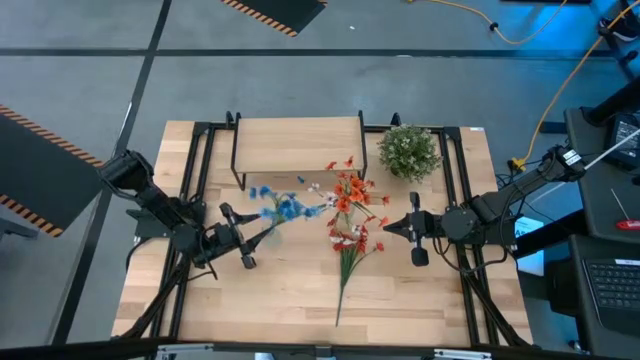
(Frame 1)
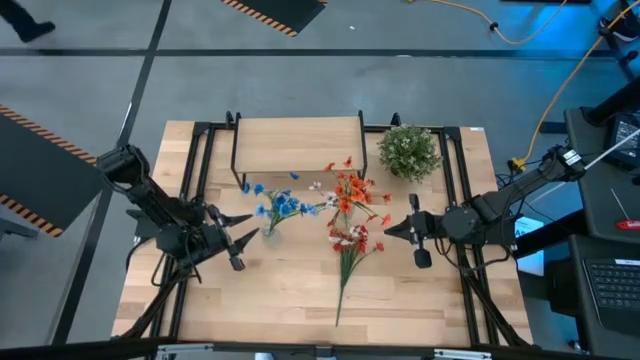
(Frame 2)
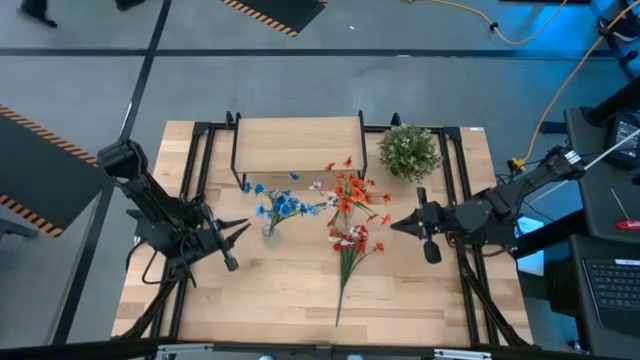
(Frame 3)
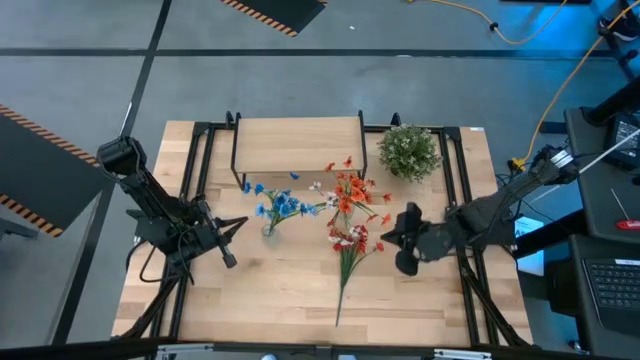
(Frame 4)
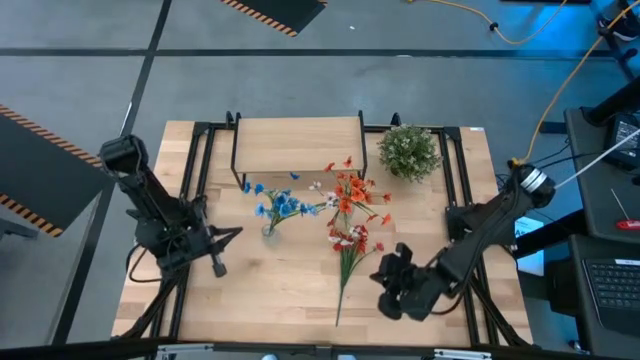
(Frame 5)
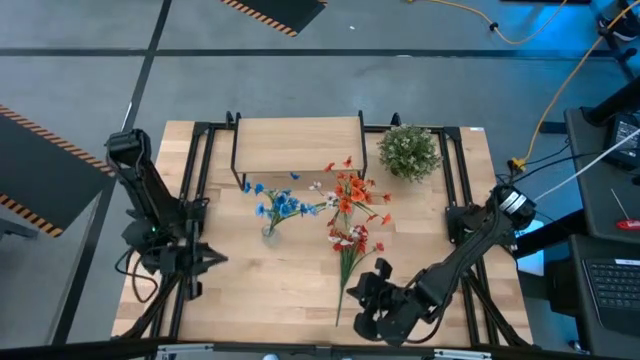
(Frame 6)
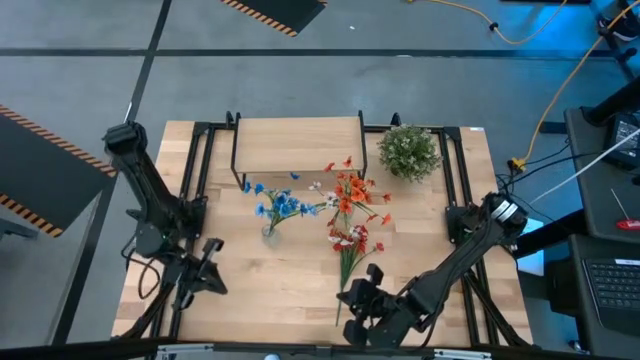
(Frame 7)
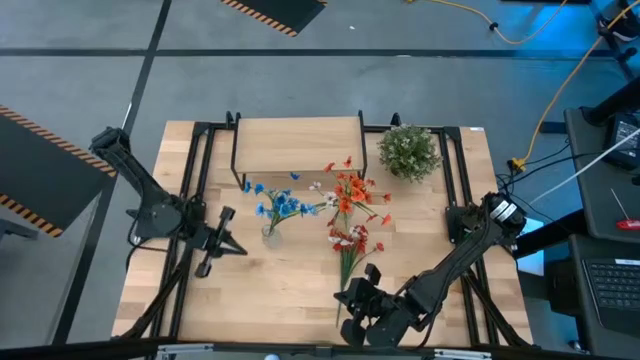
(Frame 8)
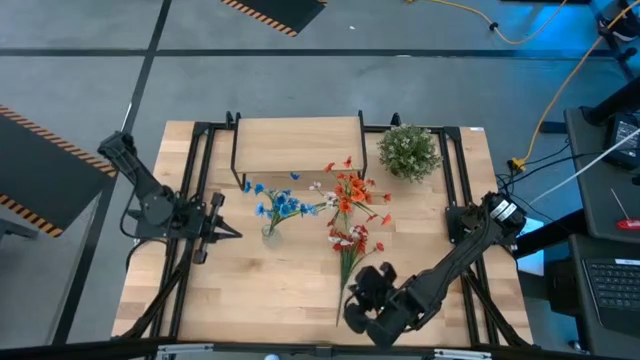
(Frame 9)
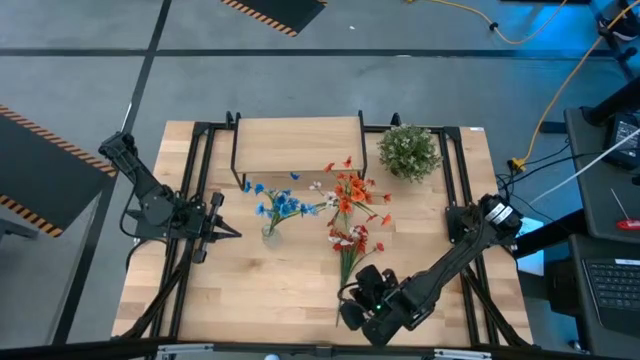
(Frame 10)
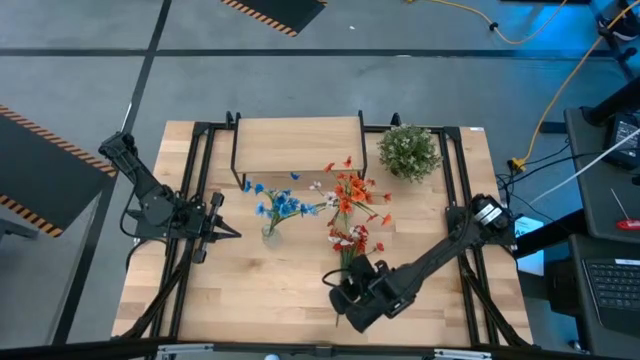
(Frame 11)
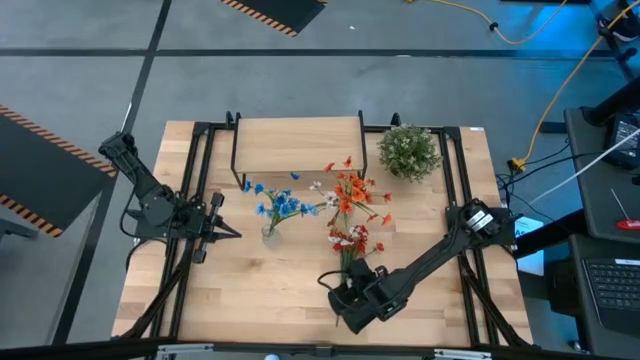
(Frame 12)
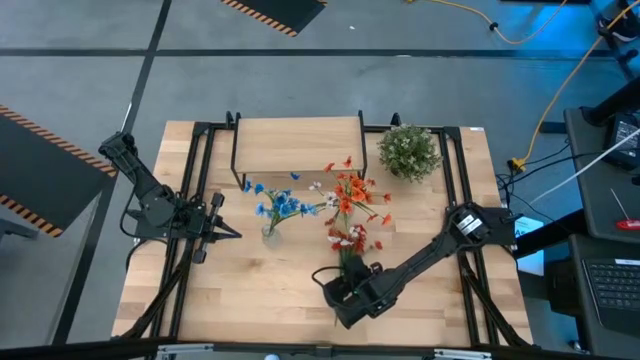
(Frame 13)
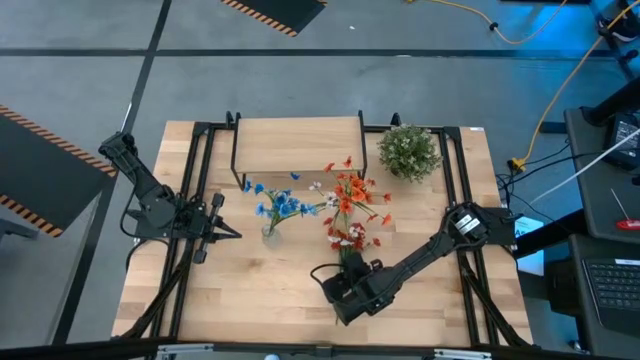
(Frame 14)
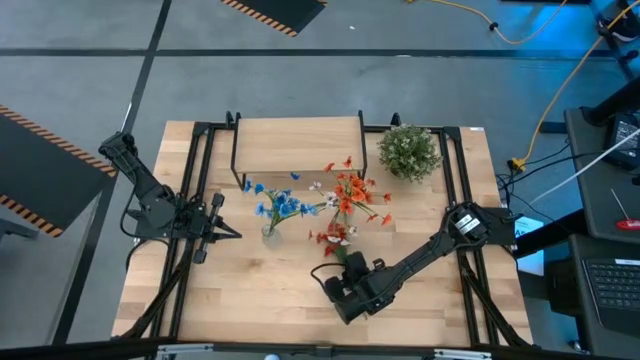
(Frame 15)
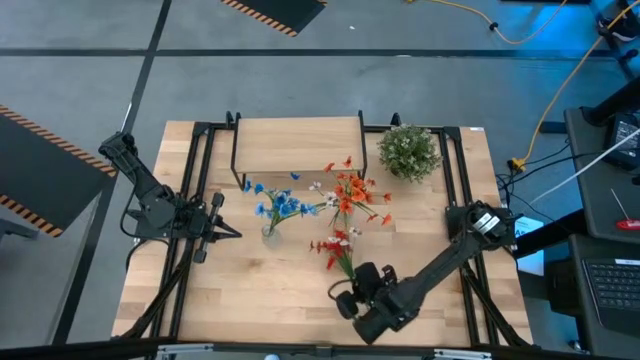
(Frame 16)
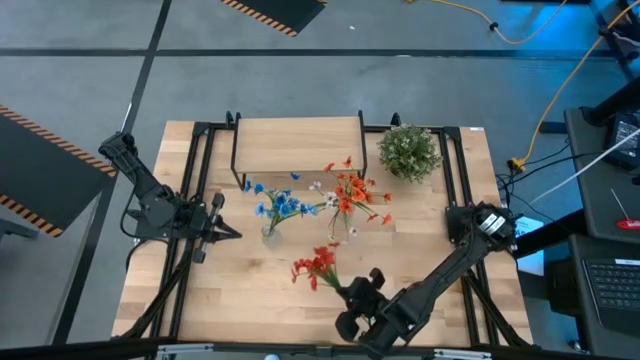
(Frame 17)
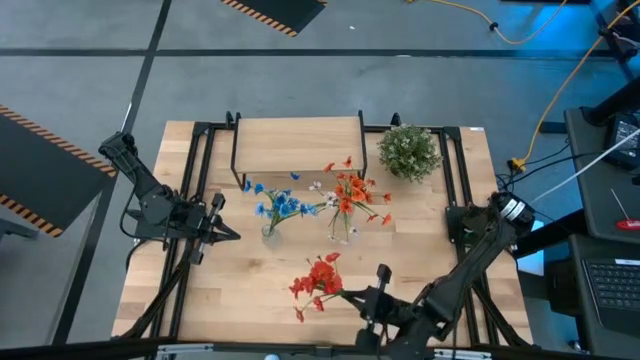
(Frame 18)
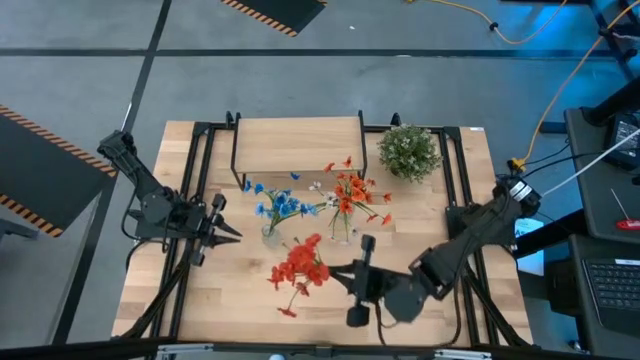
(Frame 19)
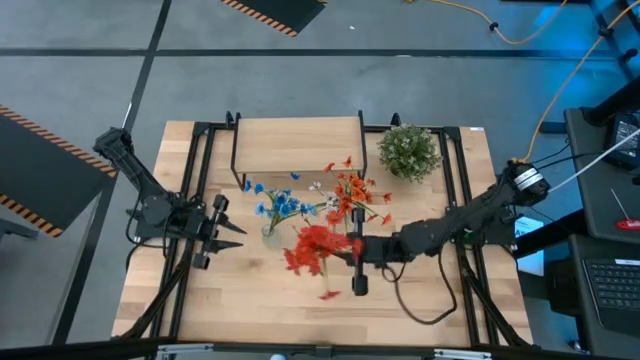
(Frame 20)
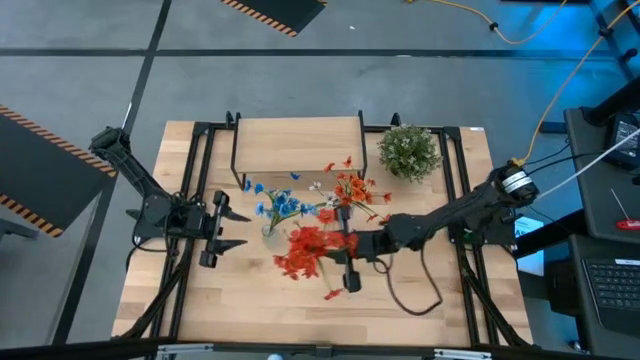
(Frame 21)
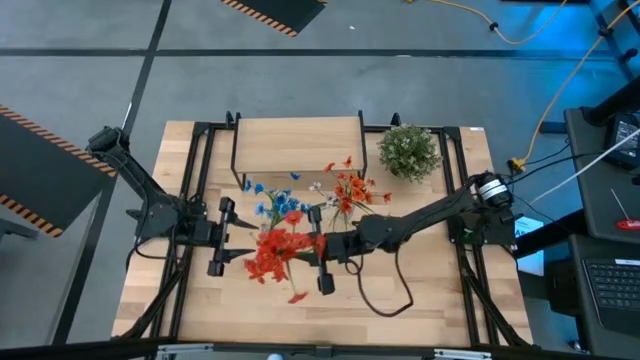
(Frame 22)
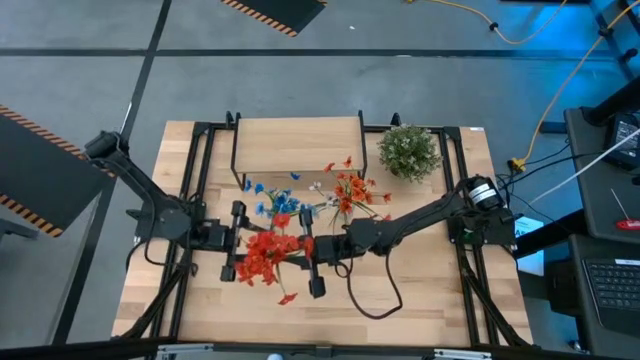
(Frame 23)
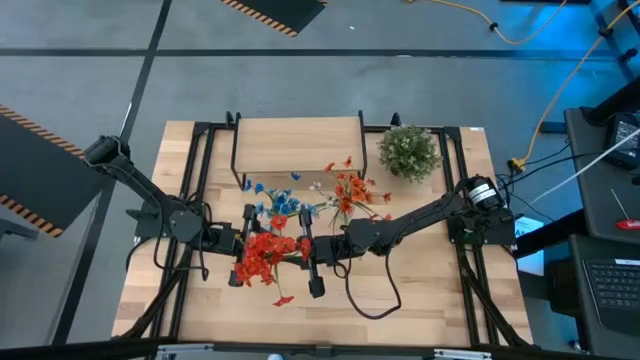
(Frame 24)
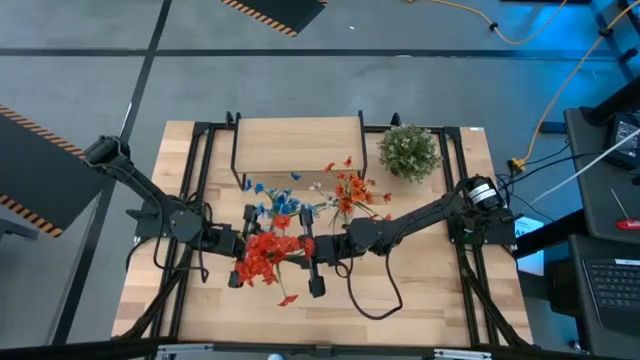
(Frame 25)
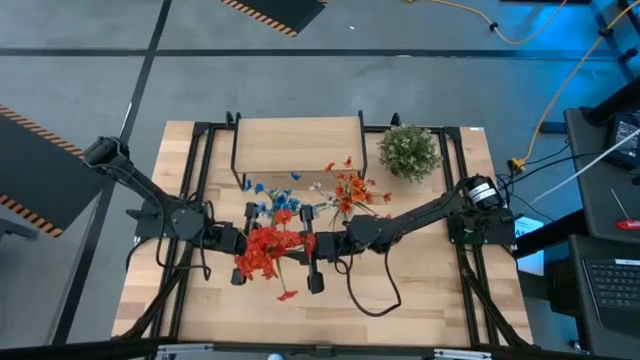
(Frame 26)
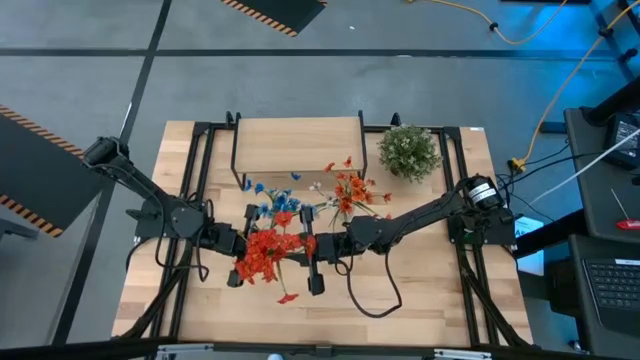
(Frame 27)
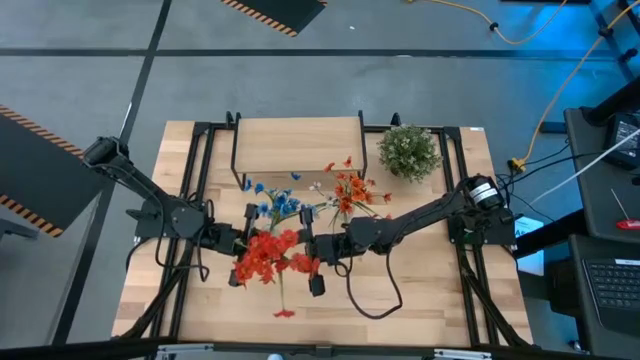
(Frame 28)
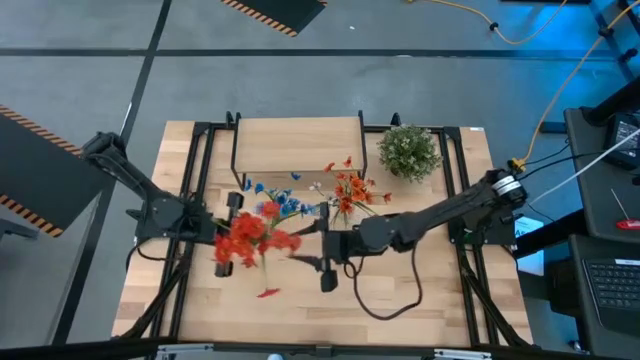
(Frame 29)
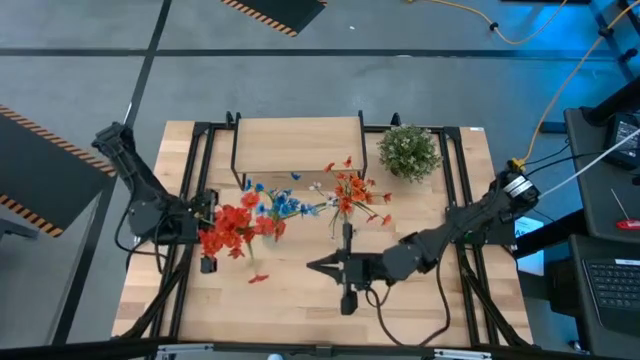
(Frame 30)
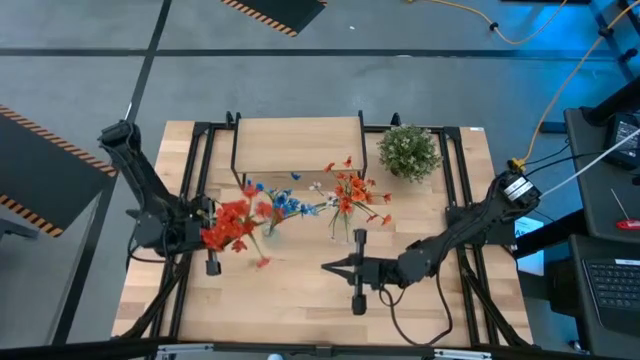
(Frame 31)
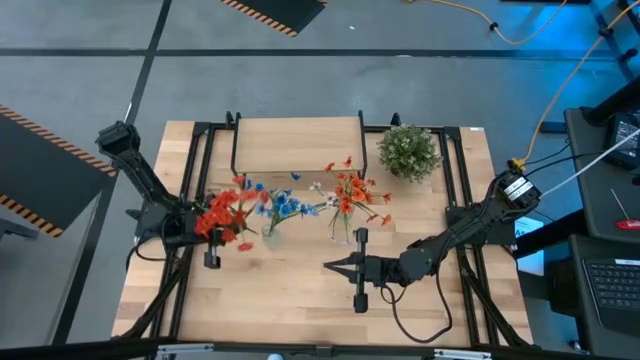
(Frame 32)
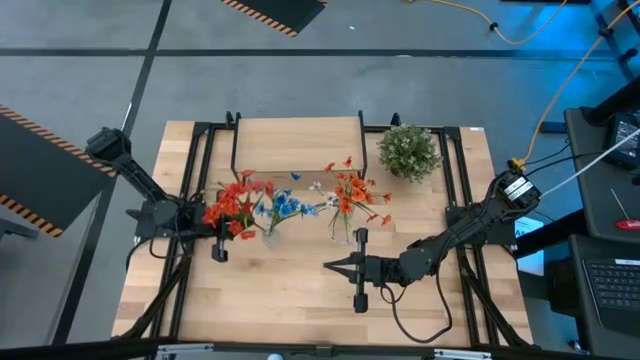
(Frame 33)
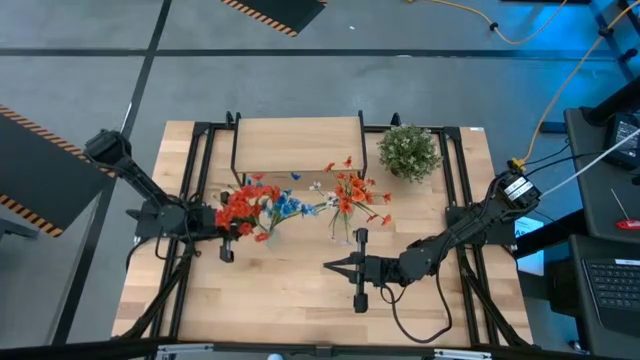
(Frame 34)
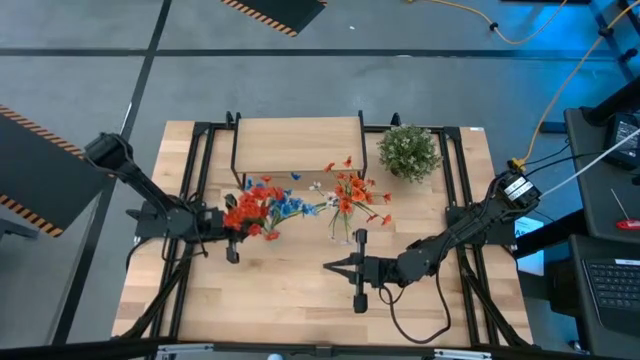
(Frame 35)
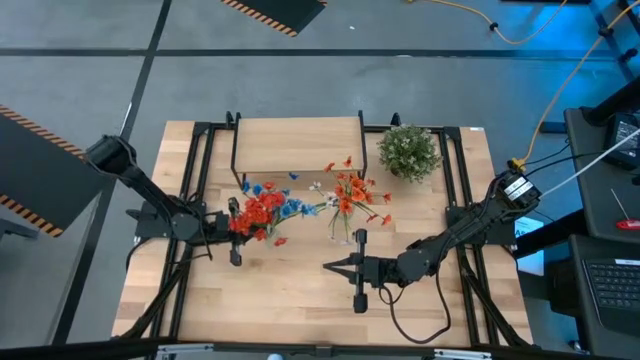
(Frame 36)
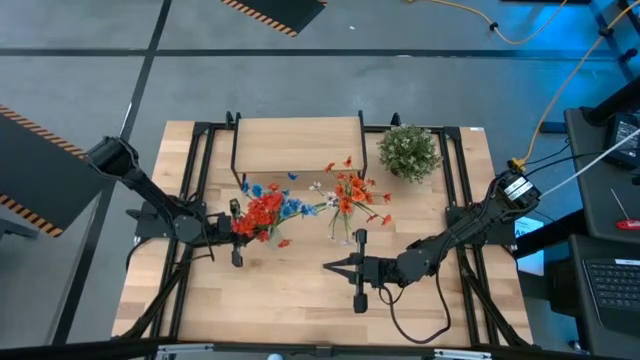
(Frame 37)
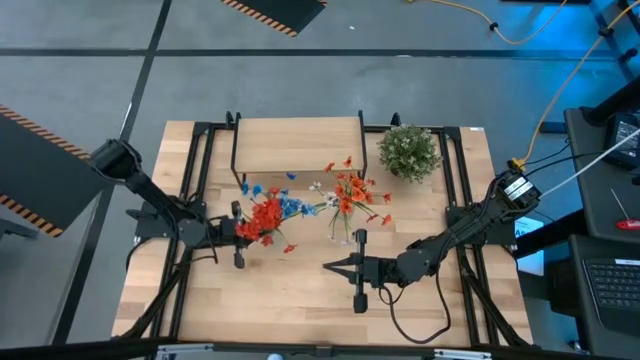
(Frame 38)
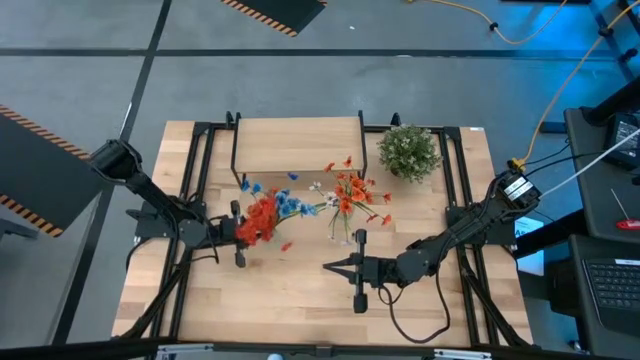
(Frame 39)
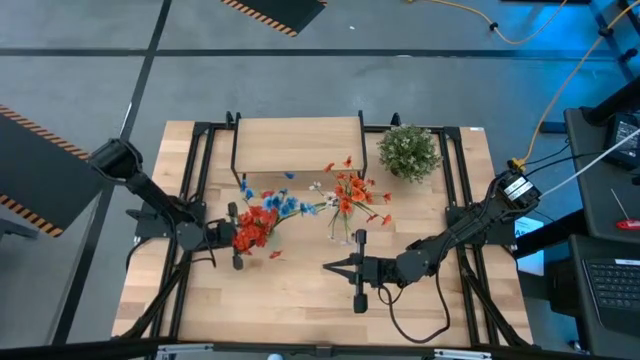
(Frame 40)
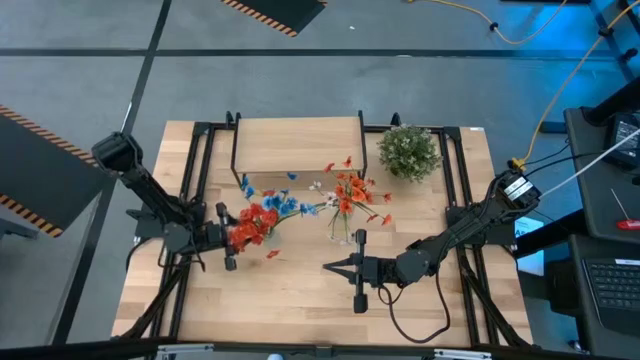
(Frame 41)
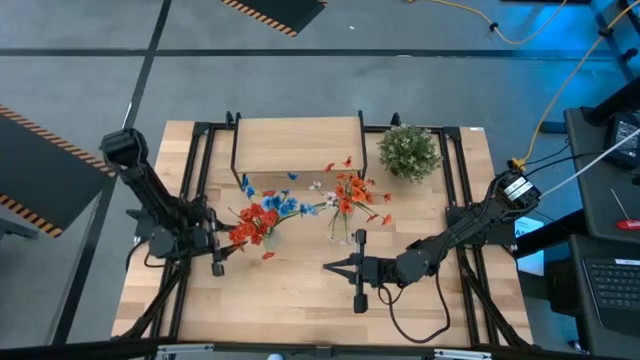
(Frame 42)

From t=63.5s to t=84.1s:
Task: Pick and place flowers into a vace then onto a shelf
Put the orange flowers into the left transparent vase
